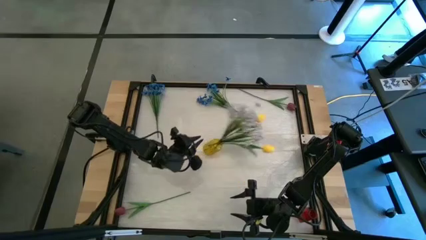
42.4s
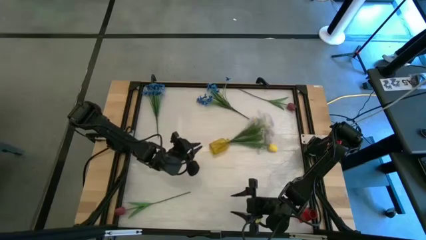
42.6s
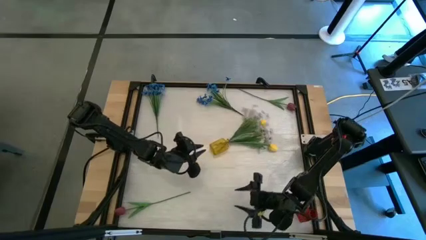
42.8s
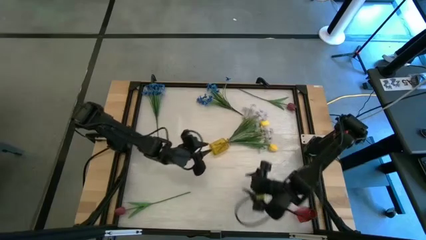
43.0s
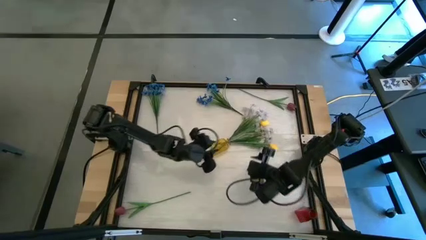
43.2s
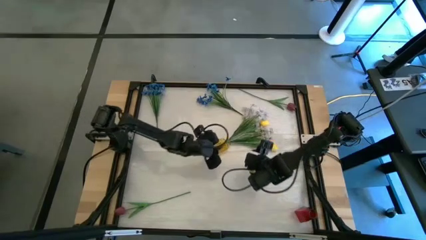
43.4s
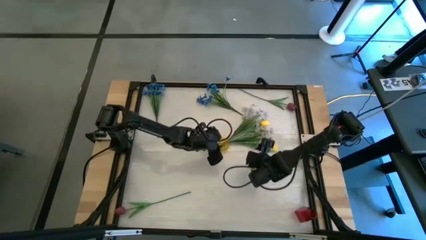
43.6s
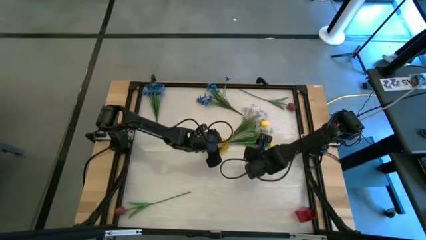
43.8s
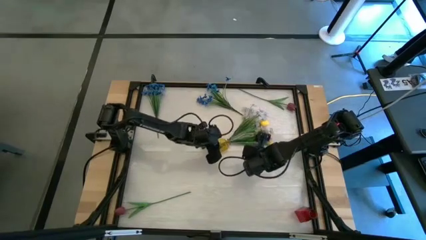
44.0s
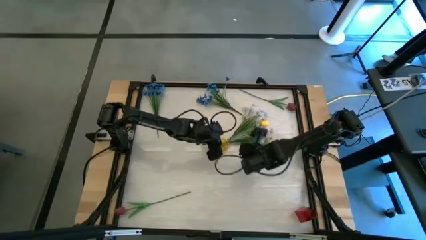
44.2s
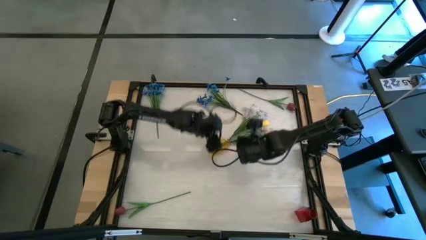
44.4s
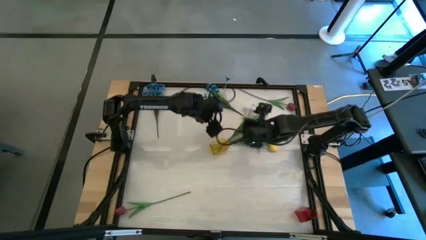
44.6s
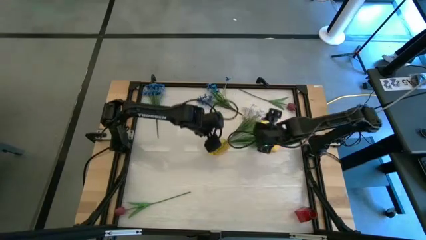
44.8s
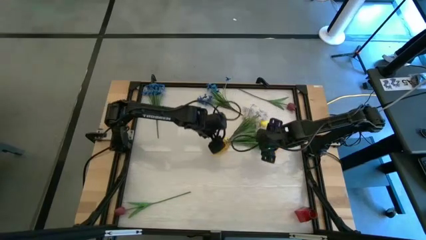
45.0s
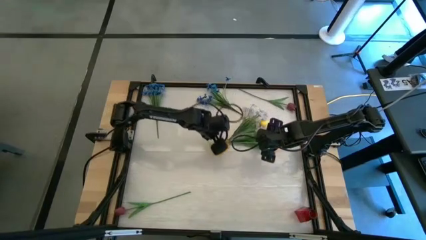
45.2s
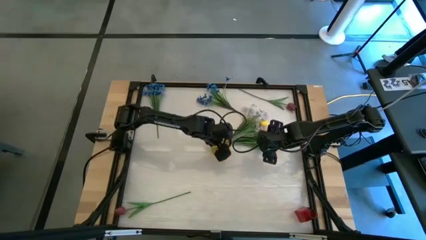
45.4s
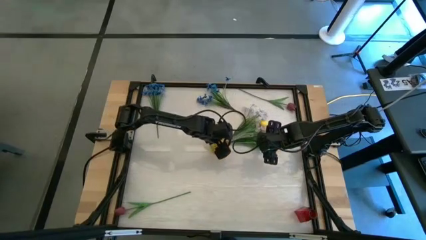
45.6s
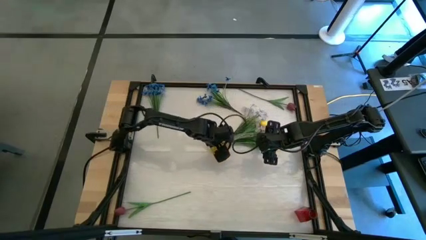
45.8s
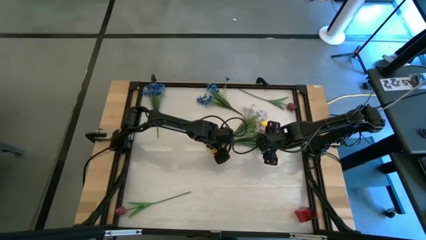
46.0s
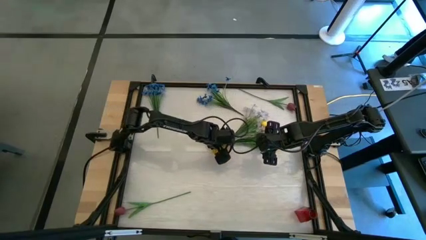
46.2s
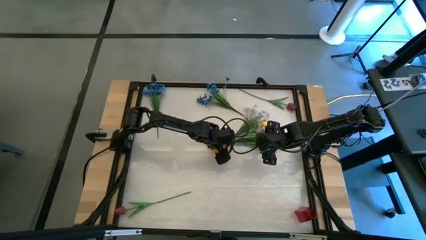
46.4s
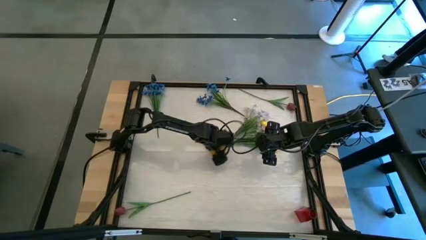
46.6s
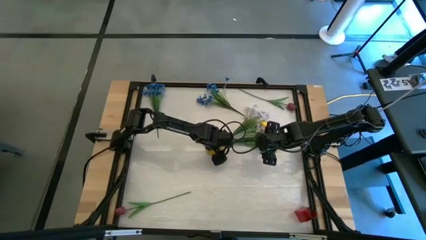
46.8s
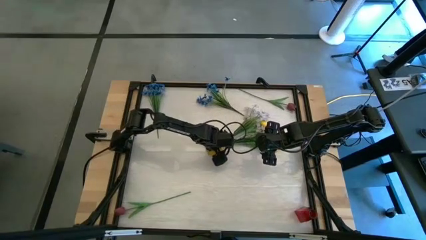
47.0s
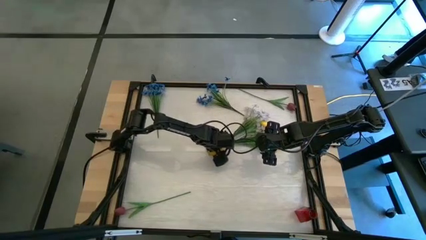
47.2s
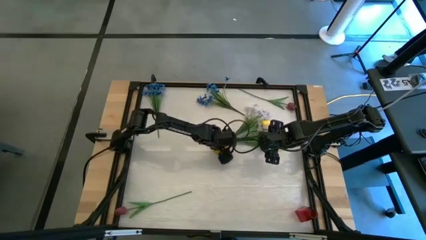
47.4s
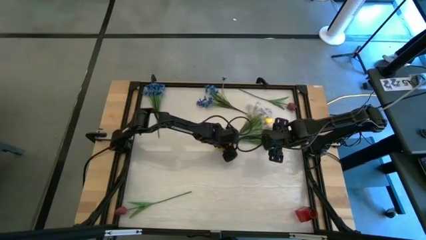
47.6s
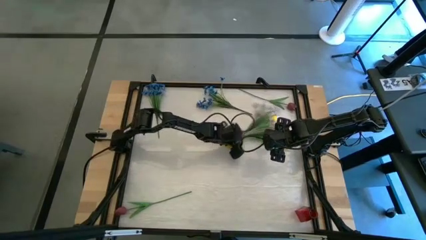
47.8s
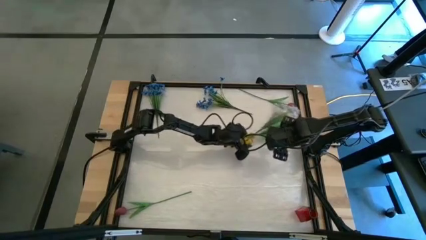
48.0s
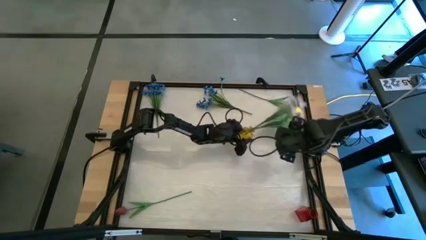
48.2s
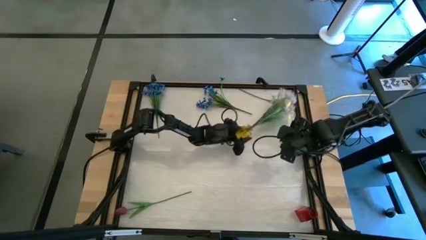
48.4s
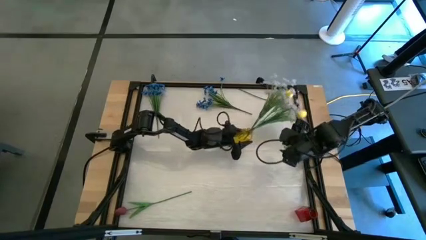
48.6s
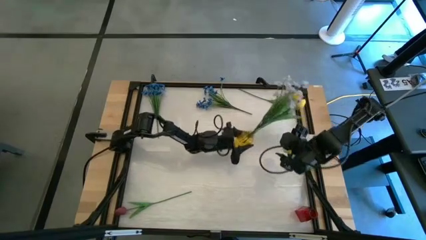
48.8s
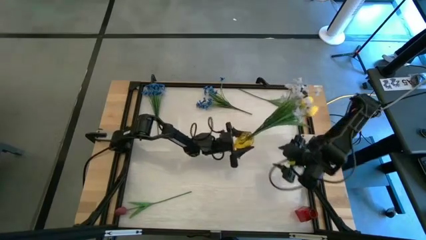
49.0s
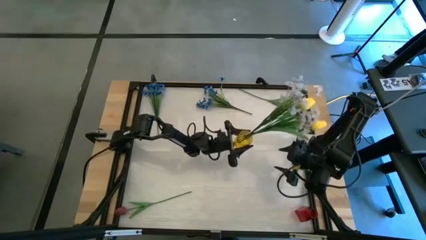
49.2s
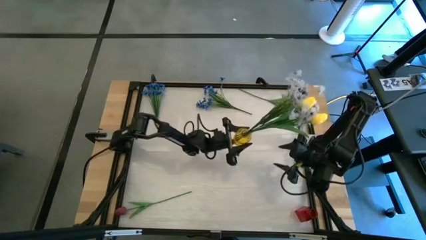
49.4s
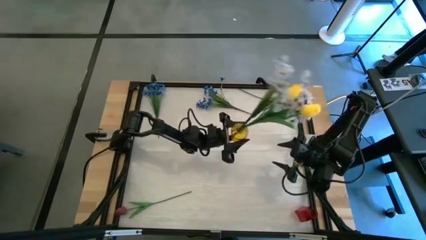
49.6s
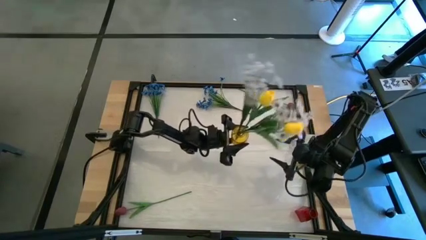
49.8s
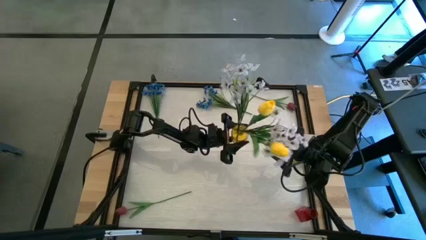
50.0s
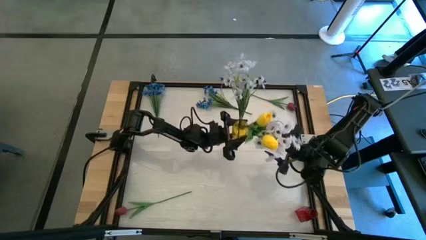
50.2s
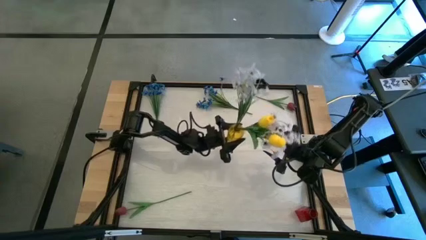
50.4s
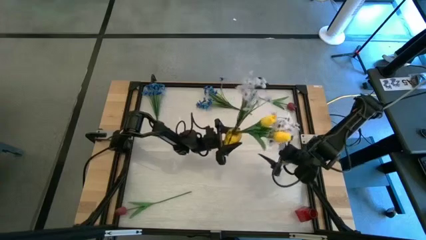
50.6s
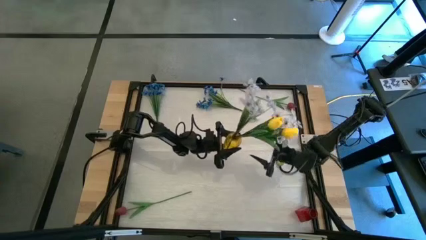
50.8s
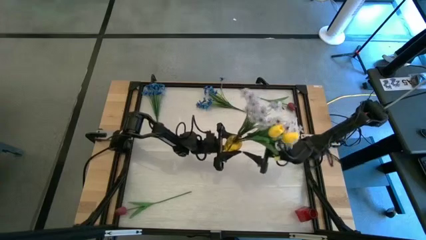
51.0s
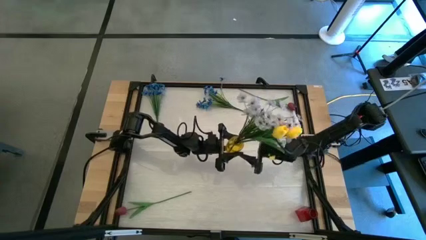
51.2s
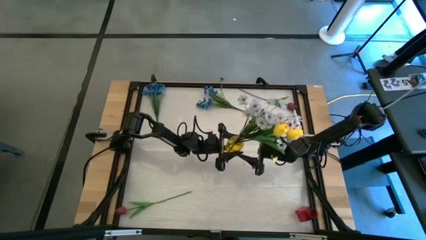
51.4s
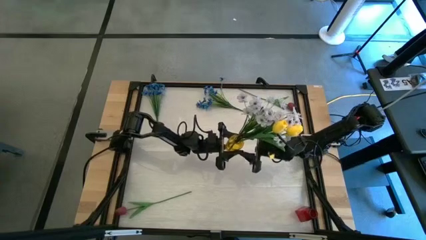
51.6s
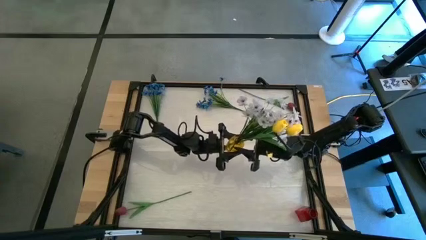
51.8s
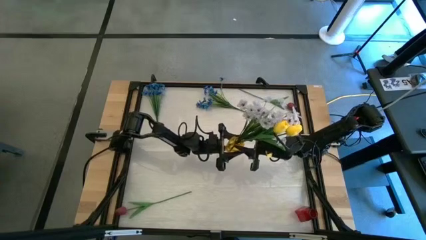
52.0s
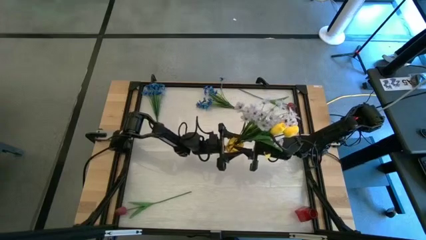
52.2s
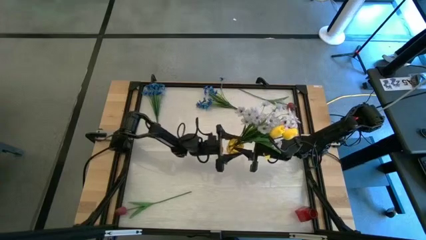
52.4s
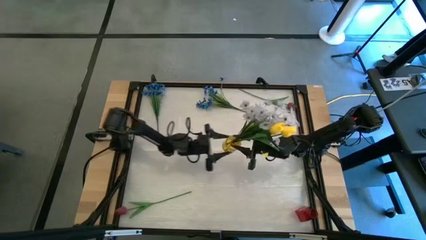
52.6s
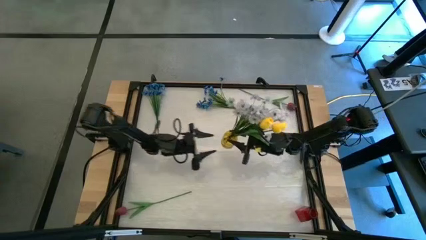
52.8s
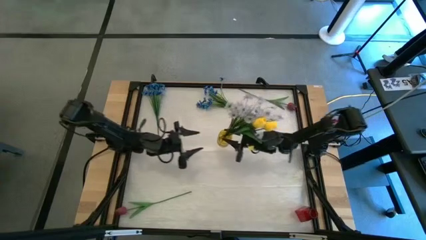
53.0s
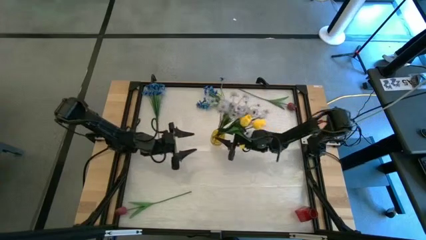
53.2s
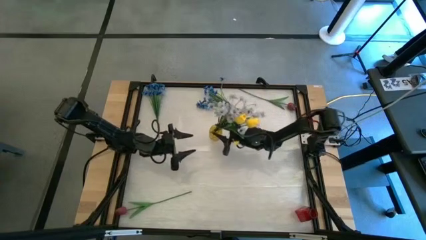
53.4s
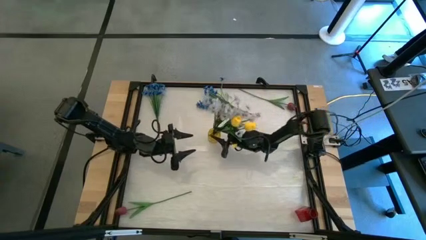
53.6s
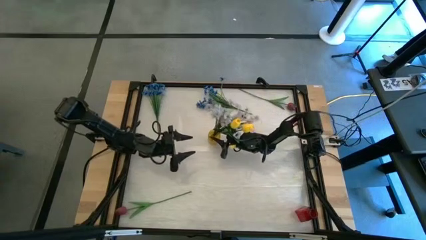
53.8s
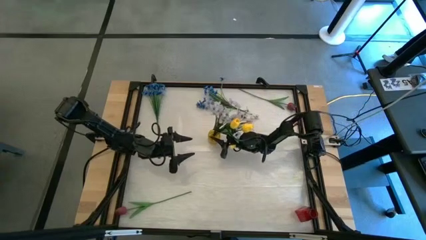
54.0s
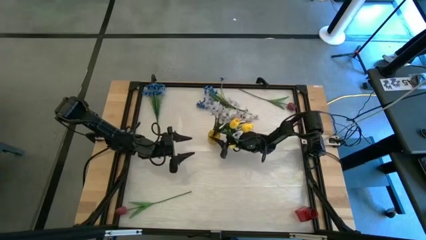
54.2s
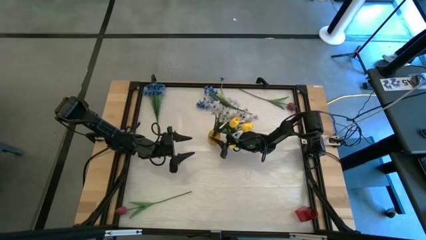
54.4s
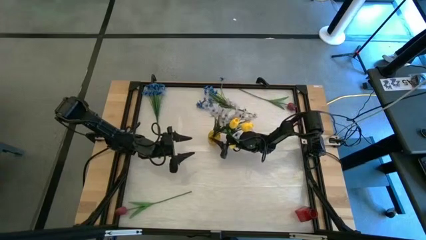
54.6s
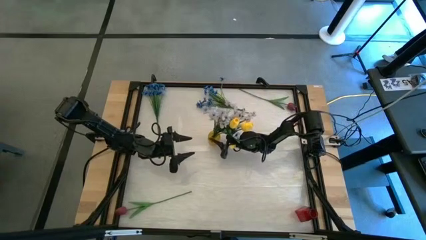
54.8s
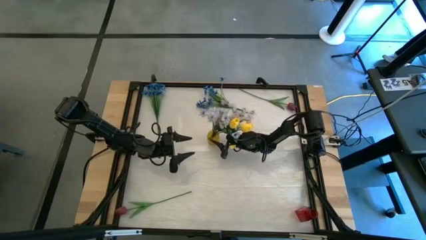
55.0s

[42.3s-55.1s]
Task: Sort flowers into vase by color
Adjust the yellow vase

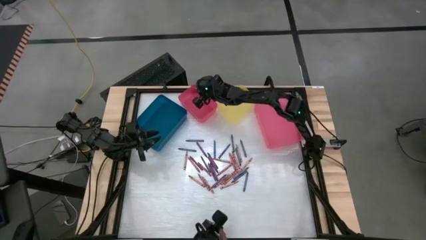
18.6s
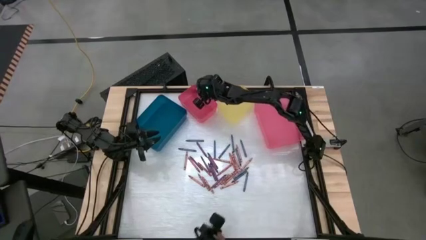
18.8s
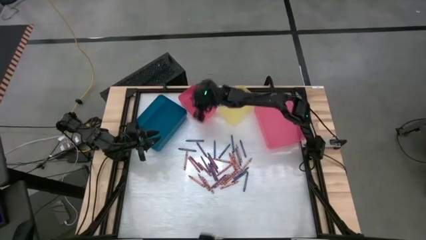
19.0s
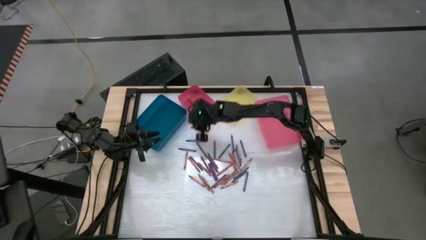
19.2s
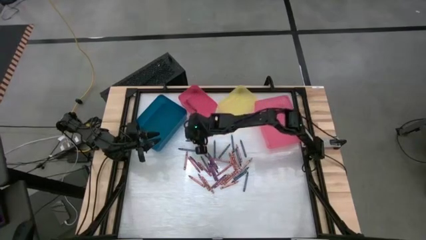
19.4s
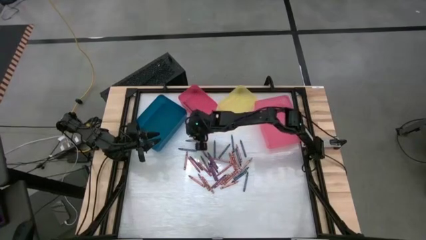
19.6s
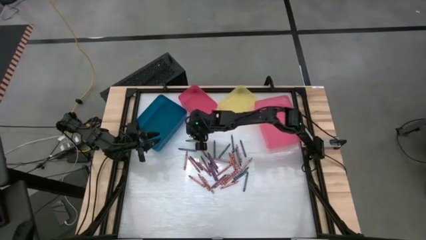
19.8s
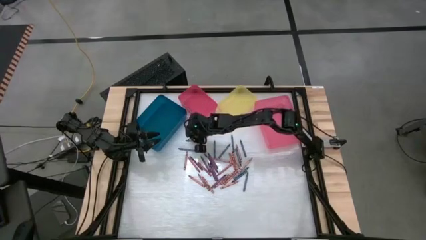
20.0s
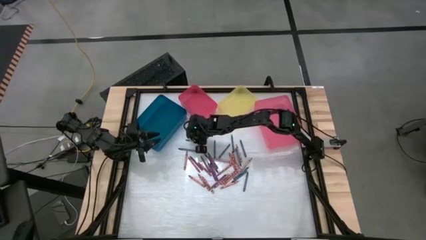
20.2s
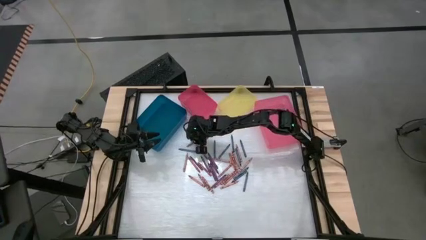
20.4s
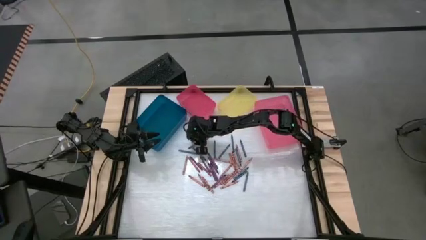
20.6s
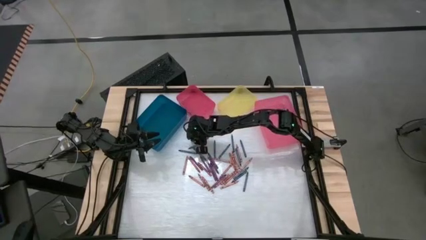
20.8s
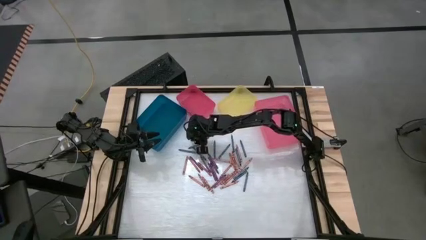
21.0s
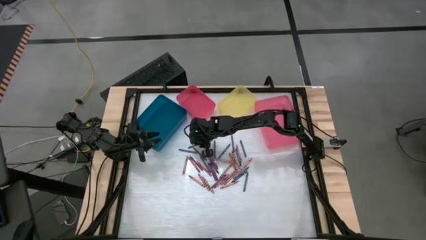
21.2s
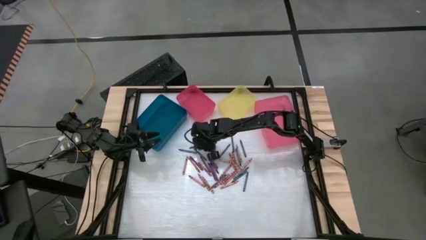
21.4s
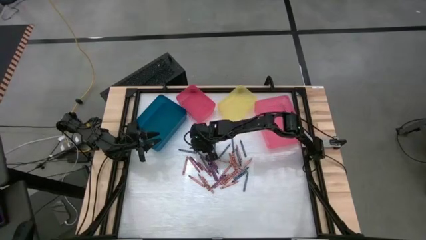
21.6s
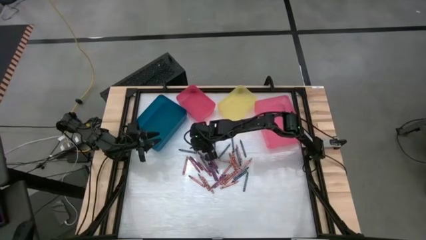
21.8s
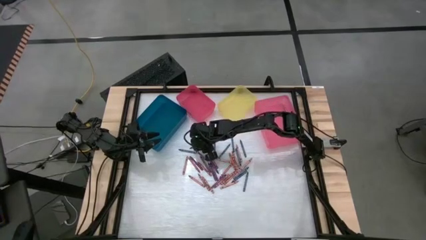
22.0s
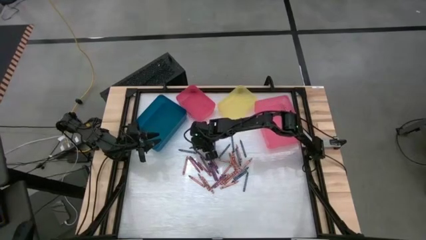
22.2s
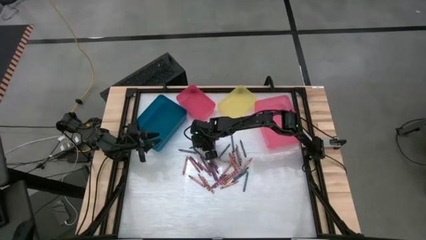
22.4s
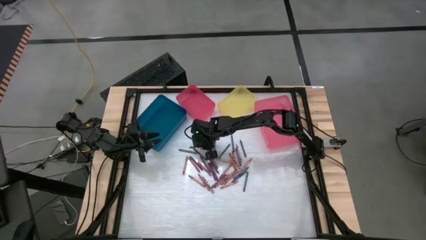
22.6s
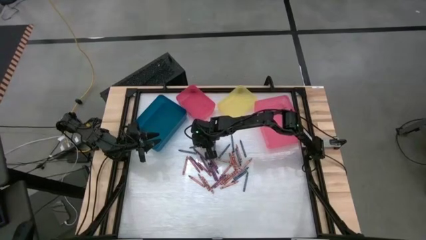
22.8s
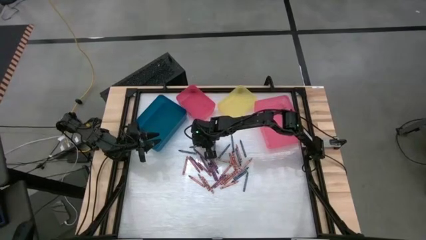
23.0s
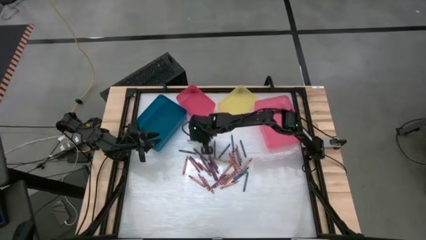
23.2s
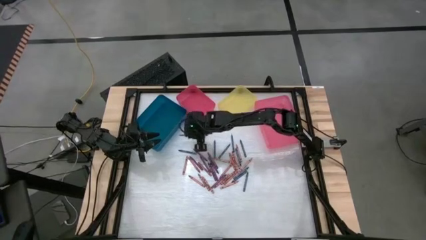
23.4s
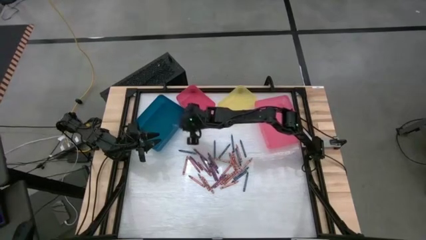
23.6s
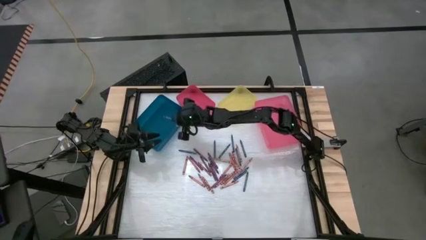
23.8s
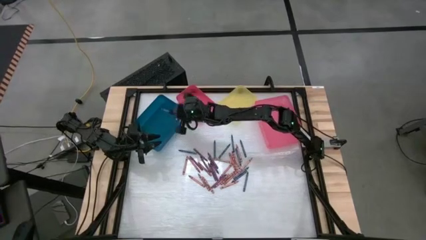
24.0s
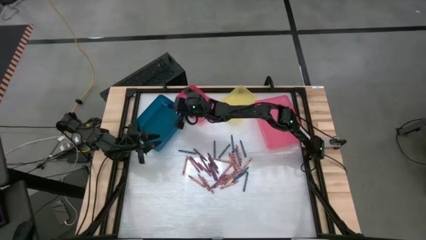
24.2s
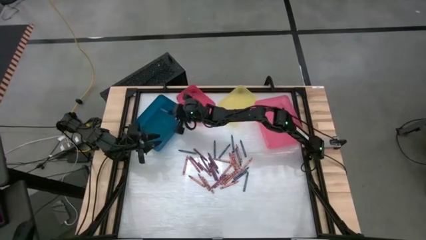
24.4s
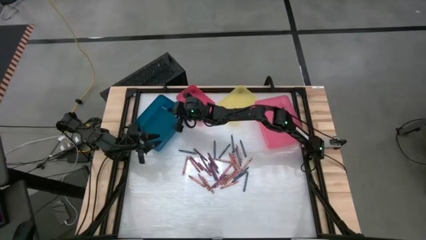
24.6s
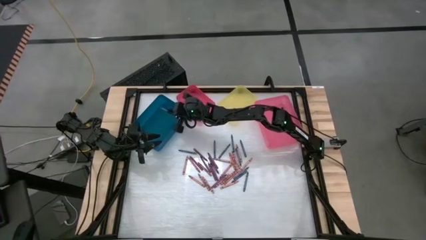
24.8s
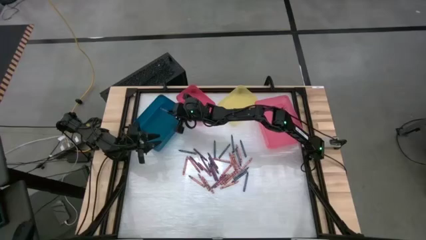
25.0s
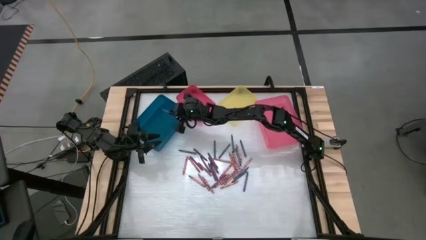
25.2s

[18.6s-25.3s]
Task: Sort crayons
Put the blue crayon into the blue bin
